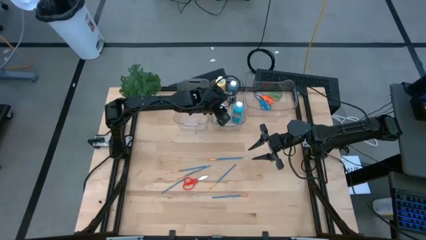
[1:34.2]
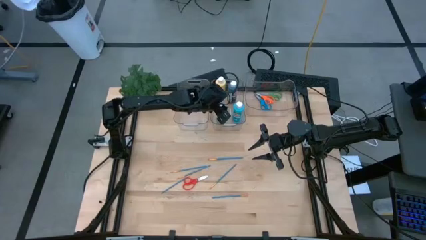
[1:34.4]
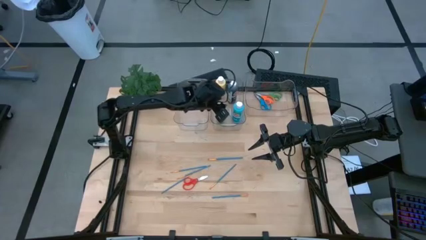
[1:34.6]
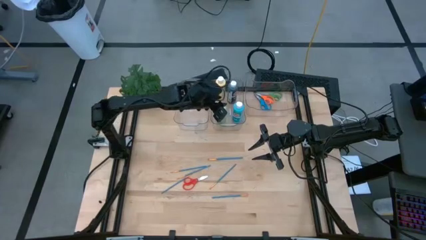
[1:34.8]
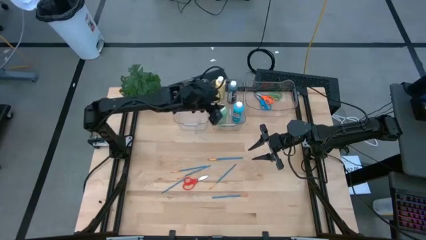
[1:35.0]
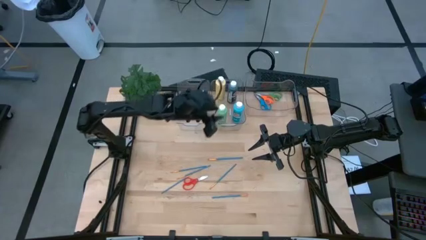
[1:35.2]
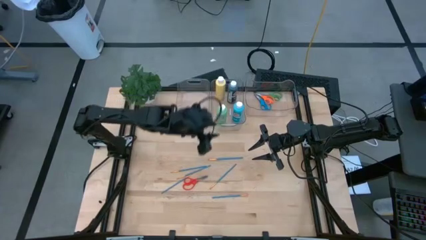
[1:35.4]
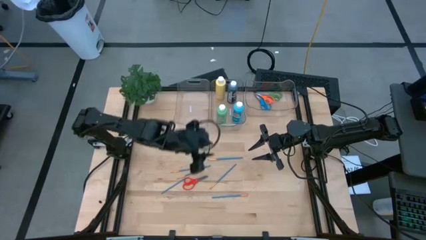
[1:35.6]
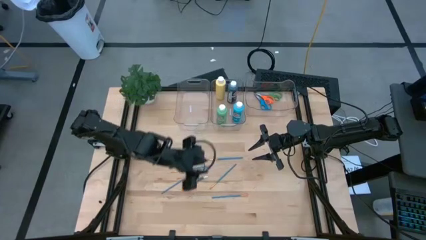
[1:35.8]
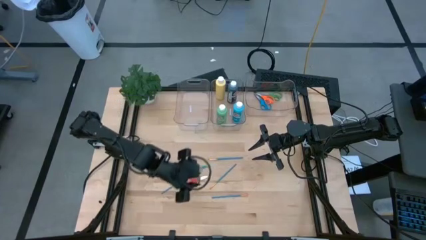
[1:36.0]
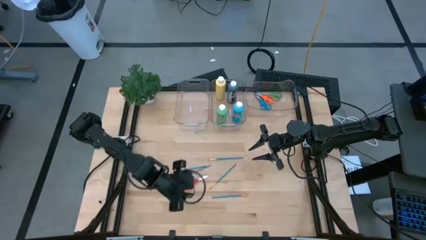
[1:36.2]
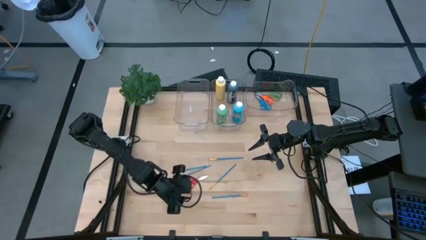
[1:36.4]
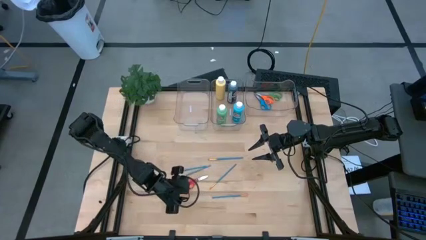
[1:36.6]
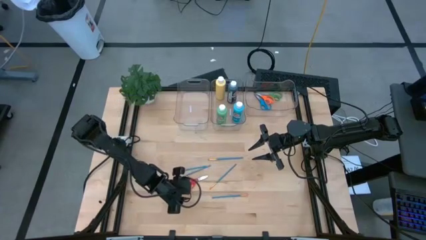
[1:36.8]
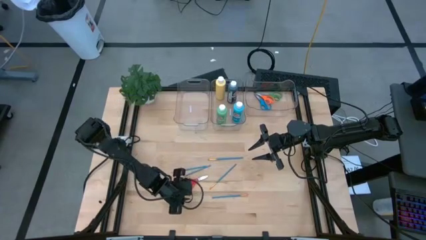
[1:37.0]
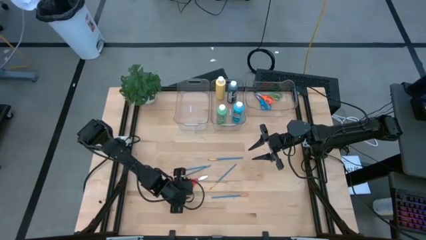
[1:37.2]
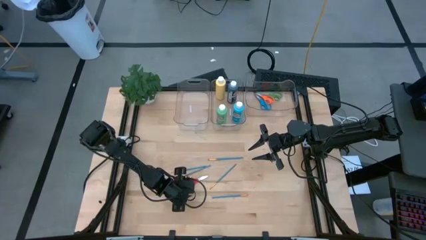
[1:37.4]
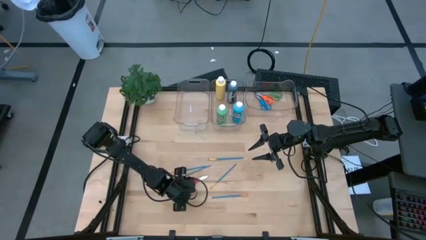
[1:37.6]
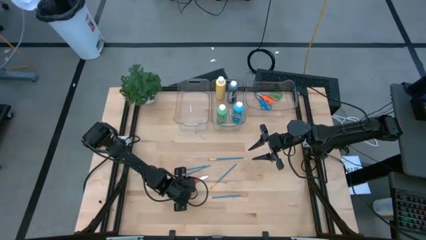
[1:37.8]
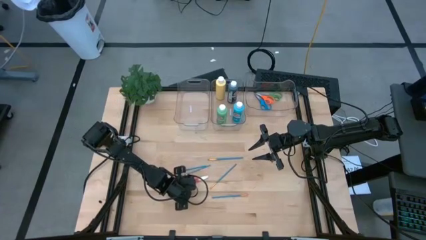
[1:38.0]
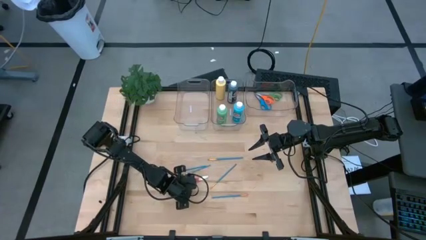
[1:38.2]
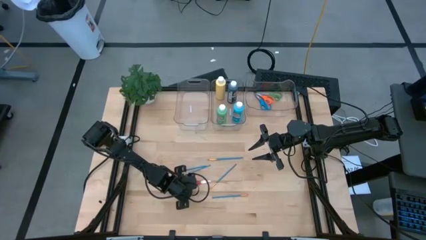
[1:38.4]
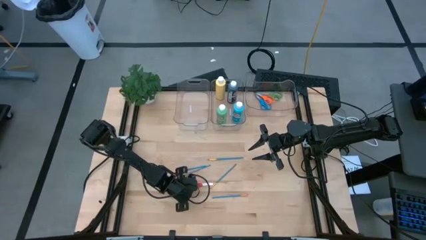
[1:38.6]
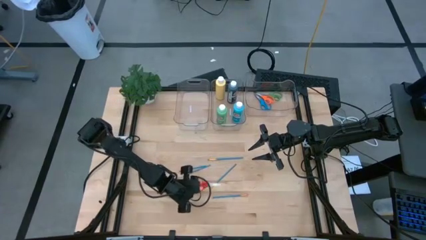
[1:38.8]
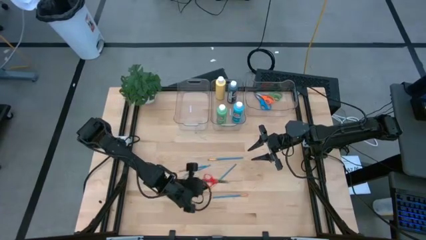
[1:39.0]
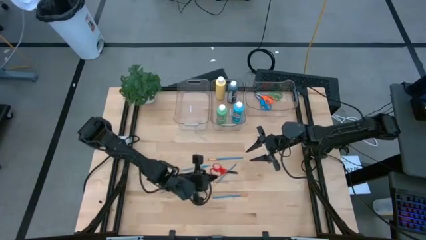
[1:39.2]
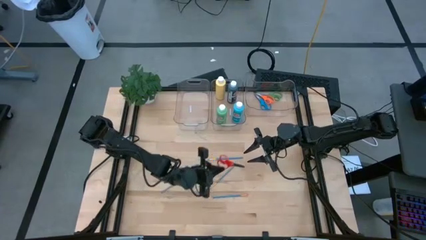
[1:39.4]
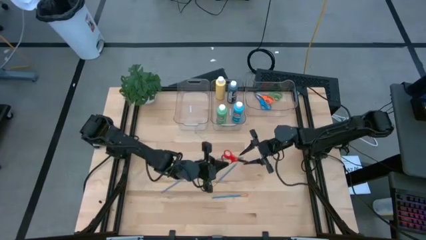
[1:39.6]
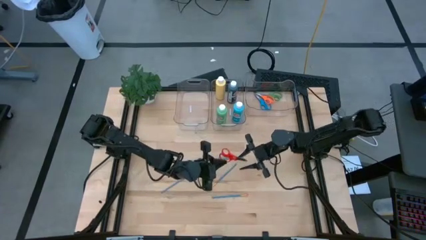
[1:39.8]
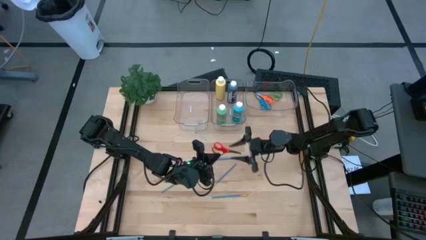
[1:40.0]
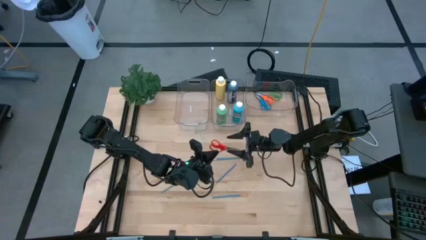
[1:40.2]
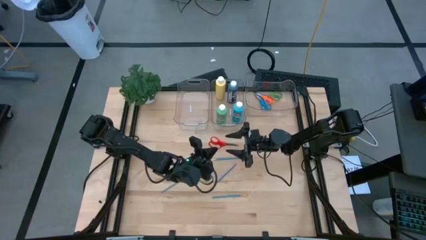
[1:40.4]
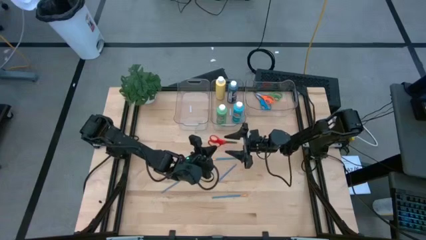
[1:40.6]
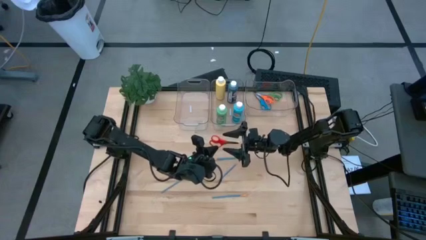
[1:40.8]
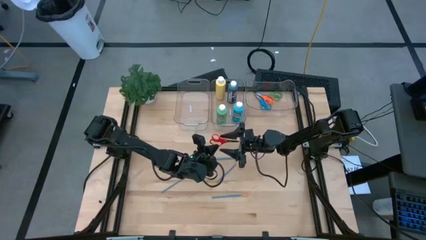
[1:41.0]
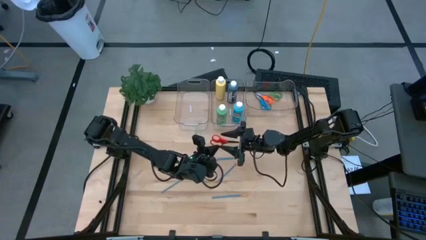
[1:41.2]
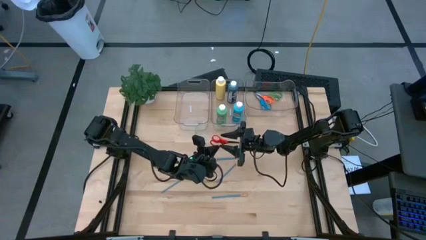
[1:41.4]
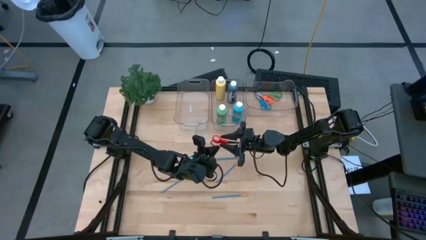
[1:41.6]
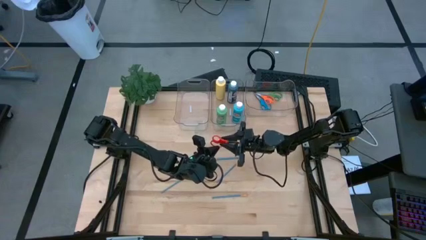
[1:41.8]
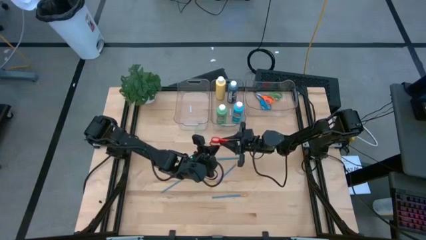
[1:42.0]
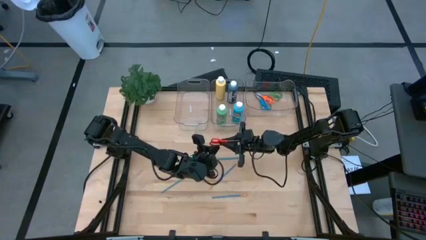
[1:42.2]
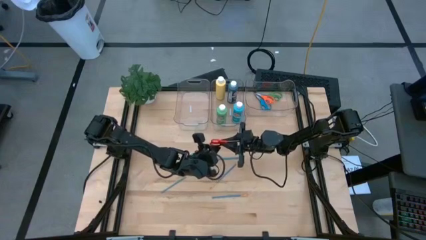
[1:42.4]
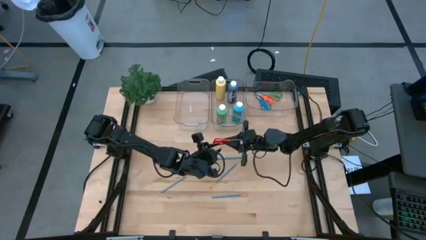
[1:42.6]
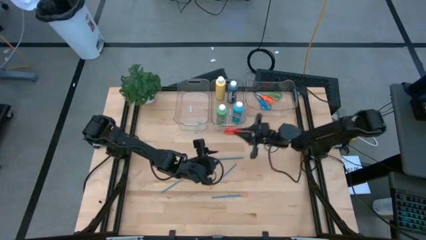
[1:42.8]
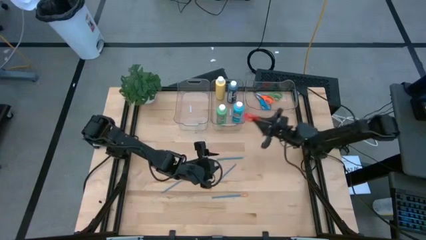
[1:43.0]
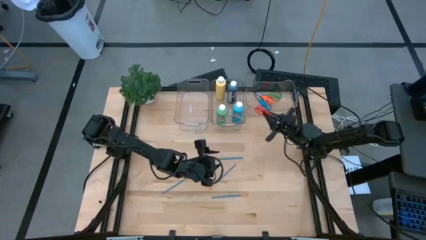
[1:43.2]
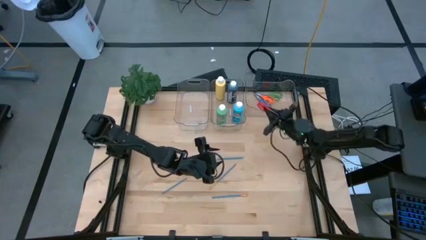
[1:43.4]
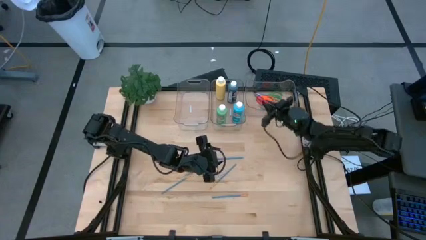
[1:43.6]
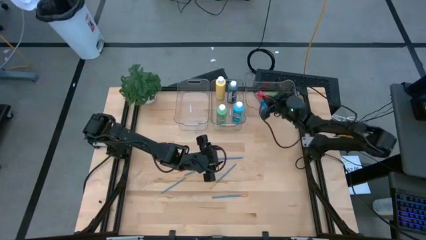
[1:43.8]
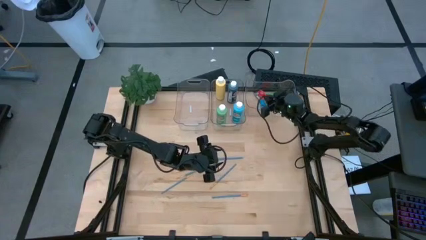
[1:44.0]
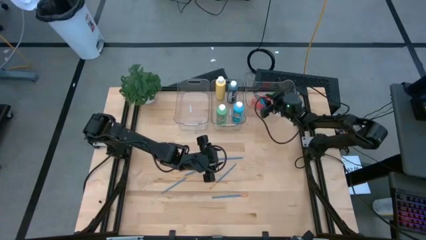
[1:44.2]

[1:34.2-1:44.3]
Task: Pick & Place Paint Supplies
Put the red scissors into the right transparent bin

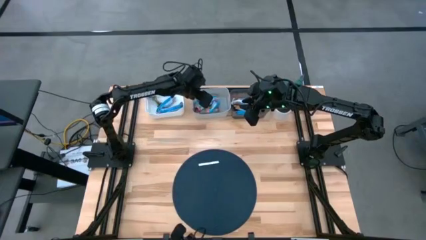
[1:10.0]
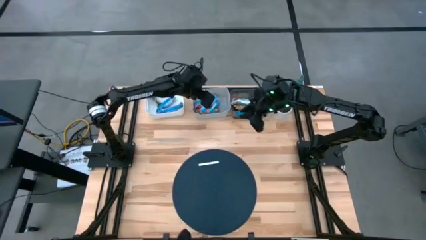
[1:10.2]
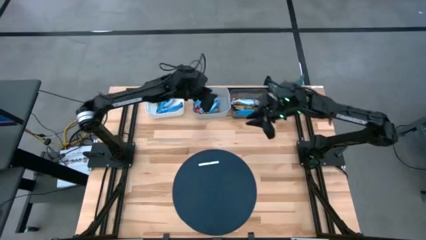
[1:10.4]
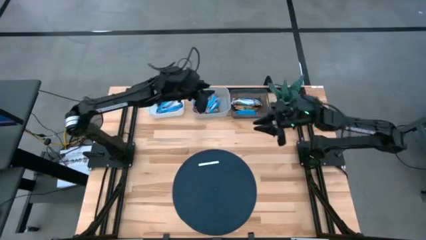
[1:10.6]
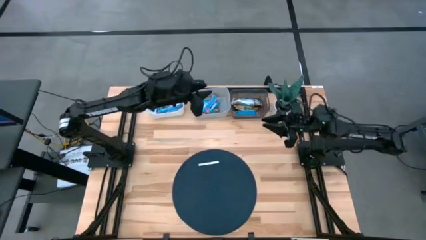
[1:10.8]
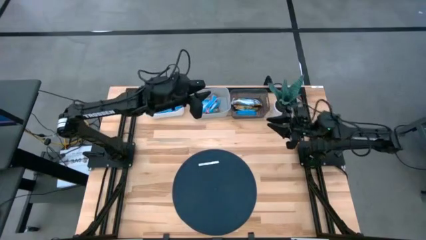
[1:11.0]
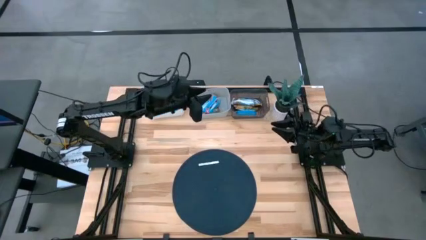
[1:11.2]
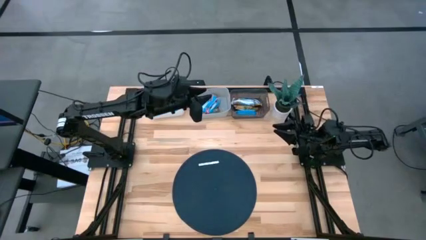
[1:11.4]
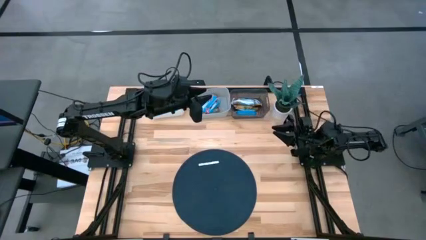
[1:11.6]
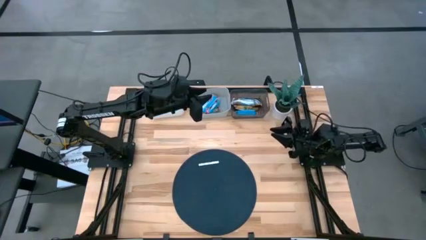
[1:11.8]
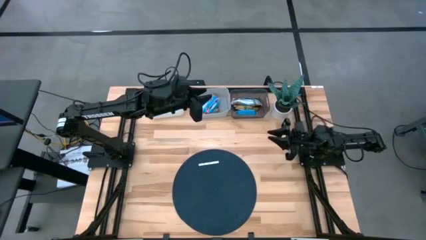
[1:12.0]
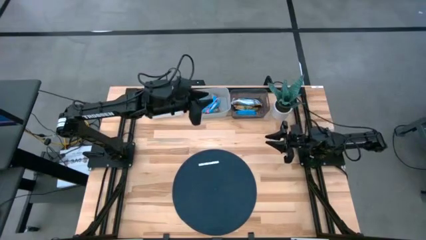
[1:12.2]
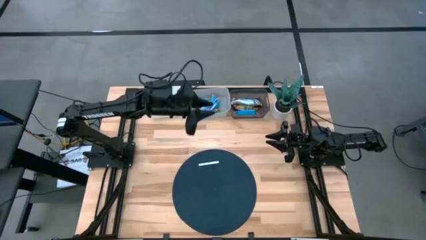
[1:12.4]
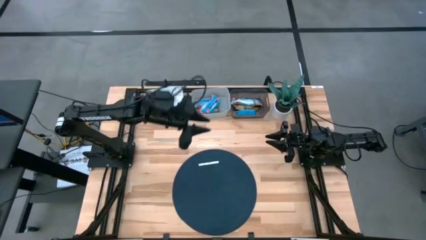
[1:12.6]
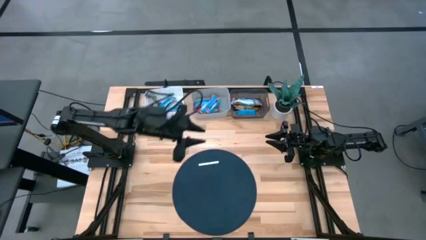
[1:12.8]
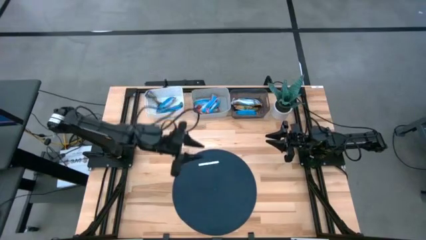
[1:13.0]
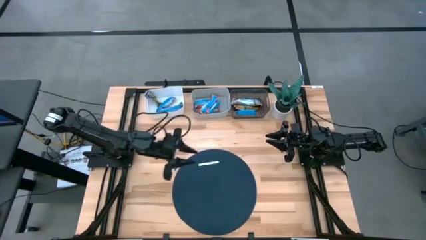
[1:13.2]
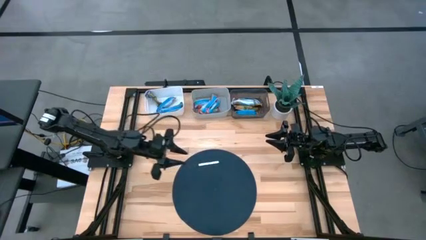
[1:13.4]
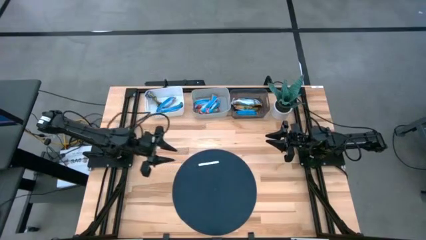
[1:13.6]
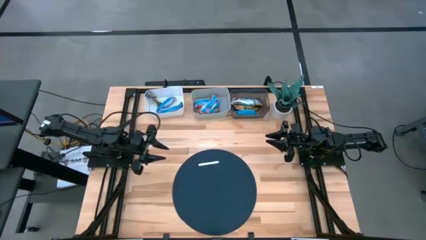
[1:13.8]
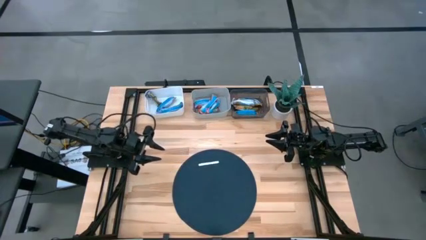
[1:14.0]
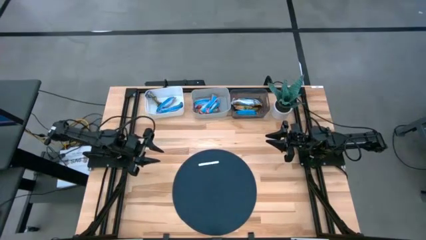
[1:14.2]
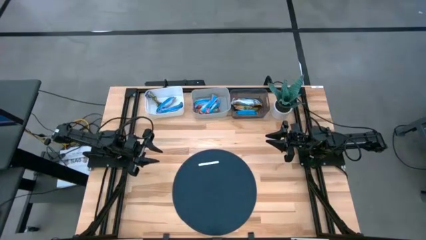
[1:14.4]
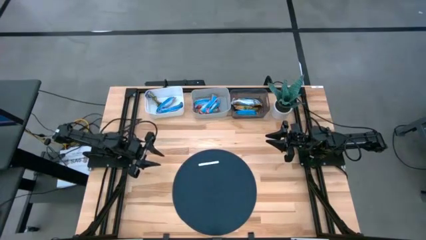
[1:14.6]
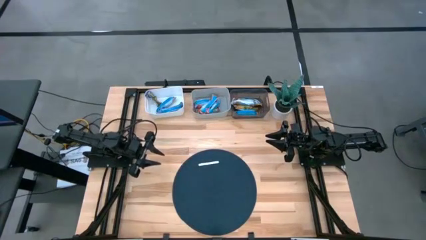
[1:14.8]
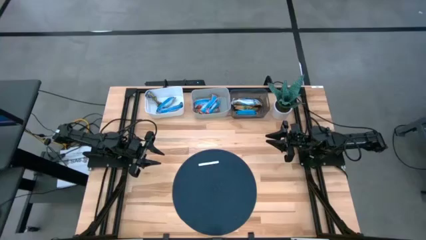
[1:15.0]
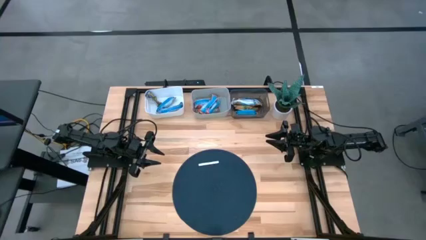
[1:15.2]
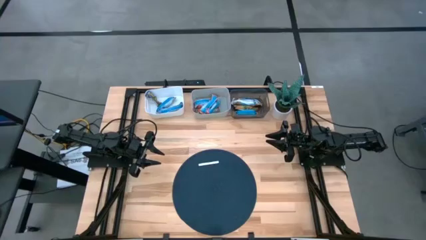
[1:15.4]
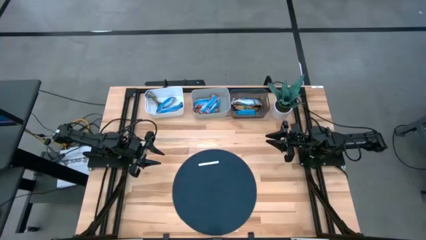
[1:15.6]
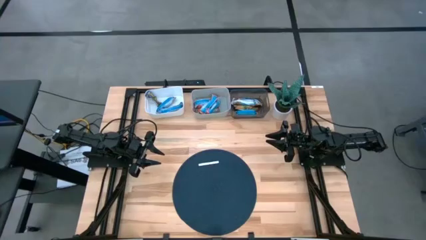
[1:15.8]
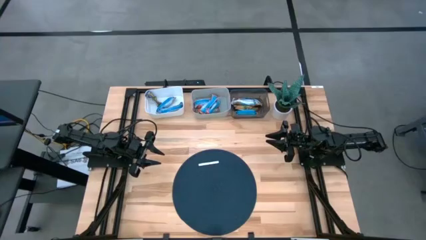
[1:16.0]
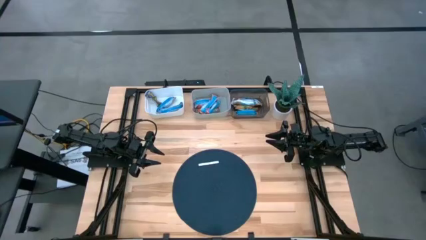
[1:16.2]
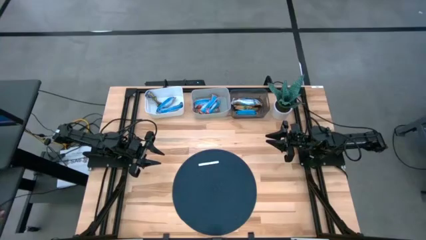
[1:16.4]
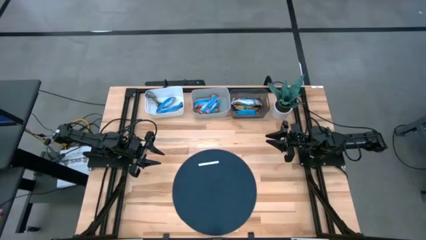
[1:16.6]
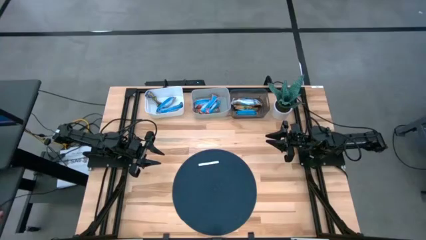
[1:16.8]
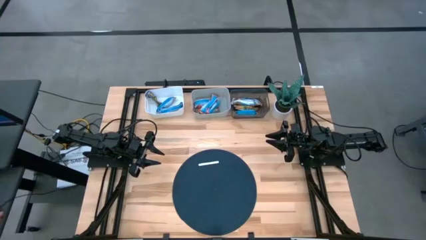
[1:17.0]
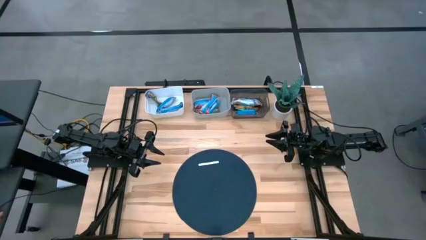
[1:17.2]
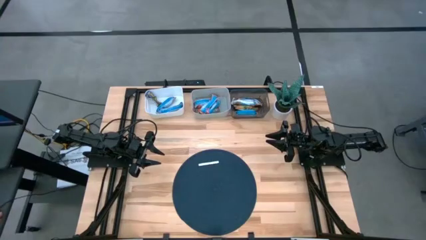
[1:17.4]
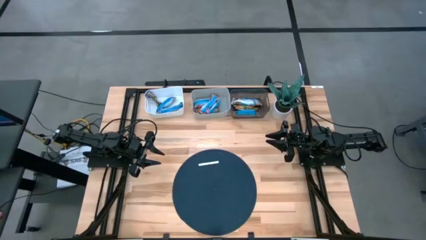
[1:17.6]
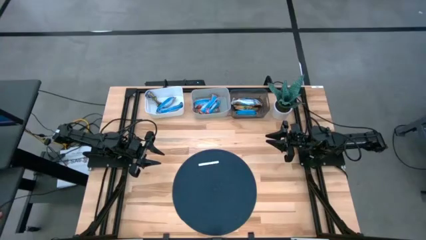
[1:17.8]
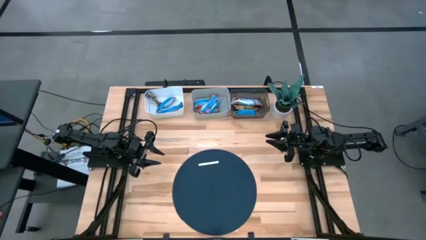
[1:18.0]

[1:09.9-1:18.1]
Task: Pick and place Granola Bars by type
Return to Home Position
